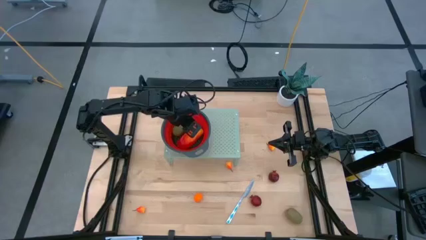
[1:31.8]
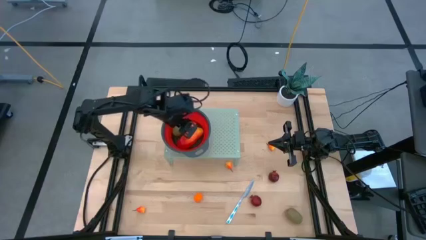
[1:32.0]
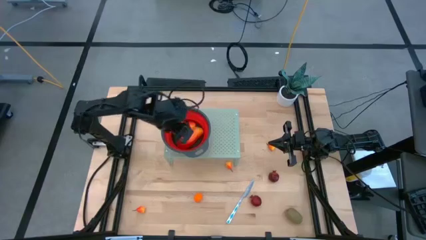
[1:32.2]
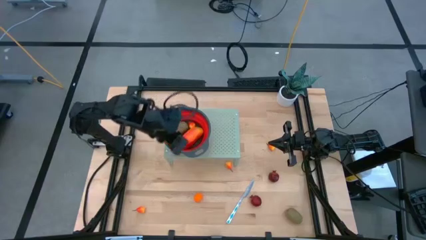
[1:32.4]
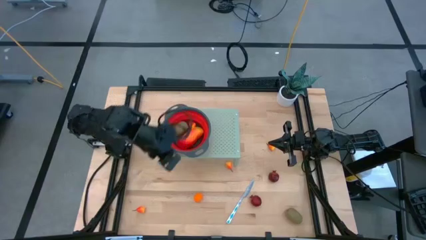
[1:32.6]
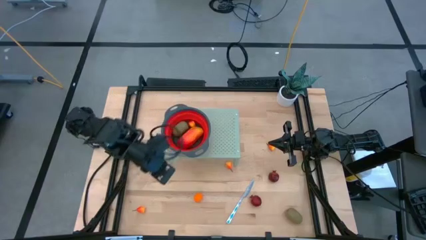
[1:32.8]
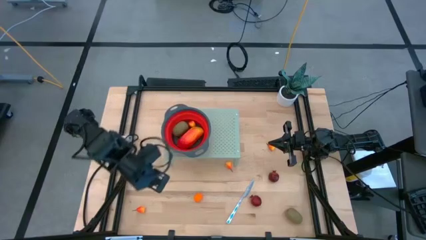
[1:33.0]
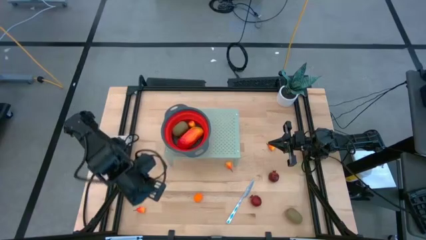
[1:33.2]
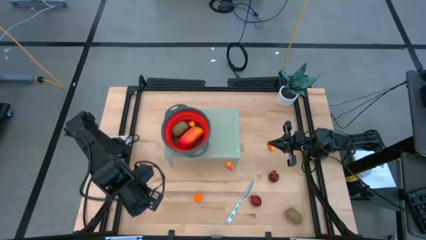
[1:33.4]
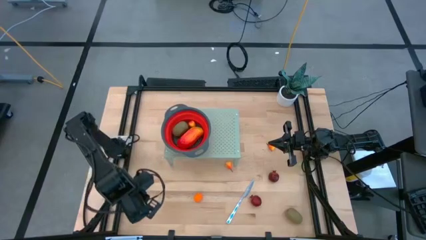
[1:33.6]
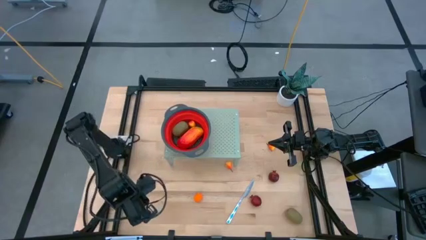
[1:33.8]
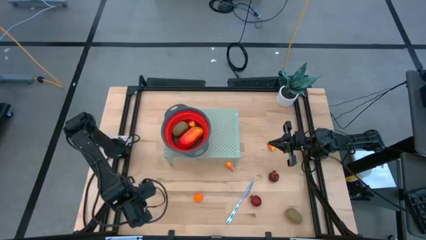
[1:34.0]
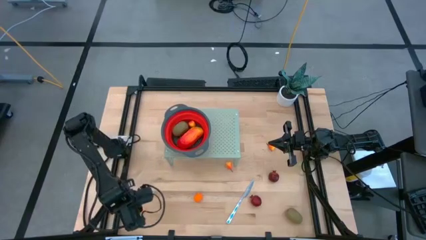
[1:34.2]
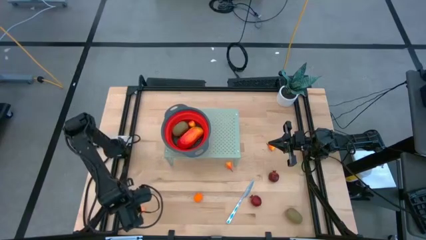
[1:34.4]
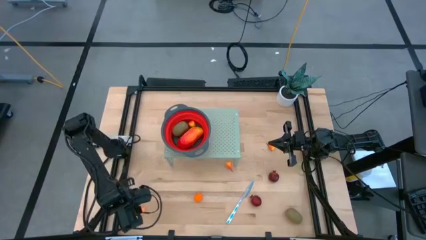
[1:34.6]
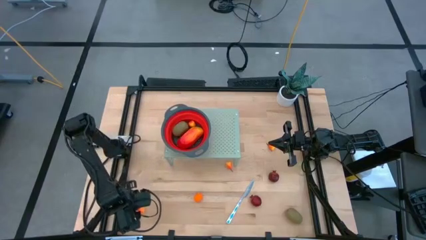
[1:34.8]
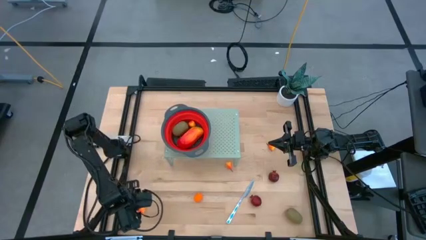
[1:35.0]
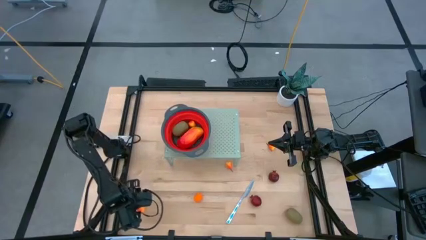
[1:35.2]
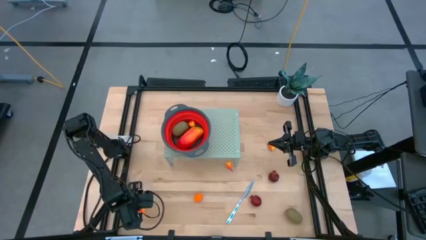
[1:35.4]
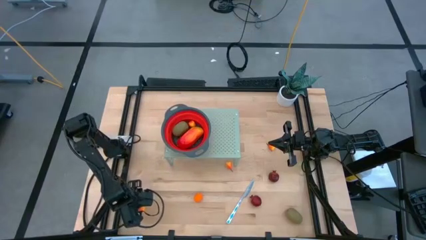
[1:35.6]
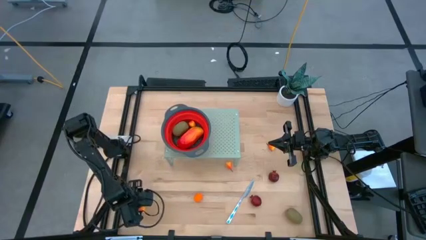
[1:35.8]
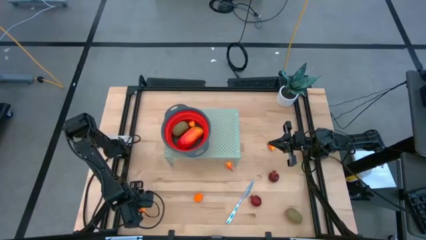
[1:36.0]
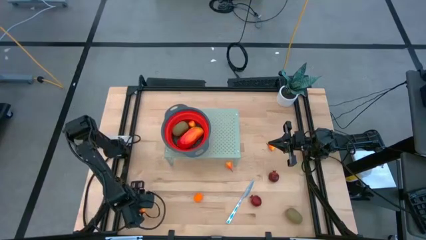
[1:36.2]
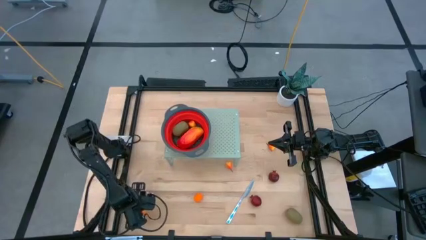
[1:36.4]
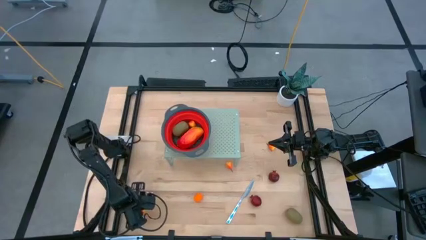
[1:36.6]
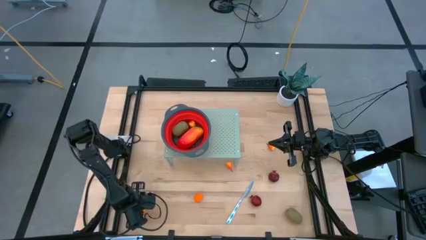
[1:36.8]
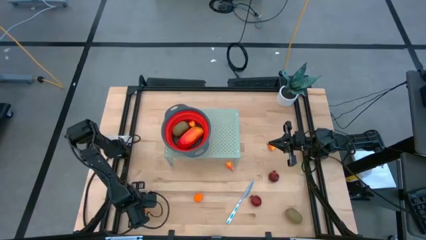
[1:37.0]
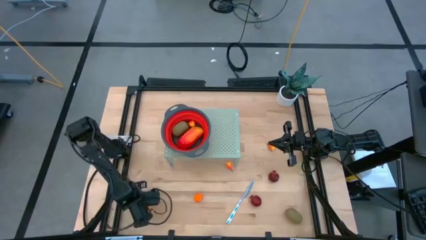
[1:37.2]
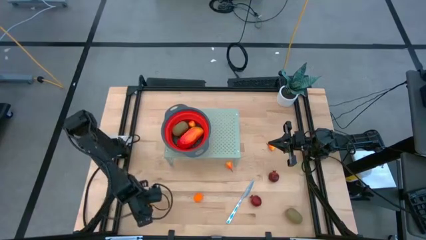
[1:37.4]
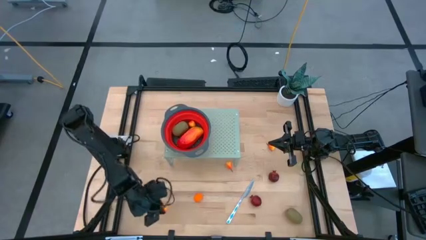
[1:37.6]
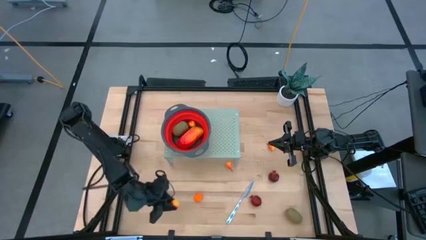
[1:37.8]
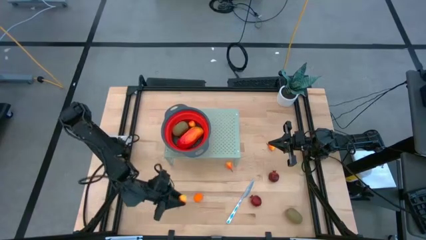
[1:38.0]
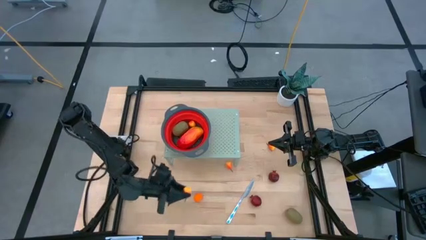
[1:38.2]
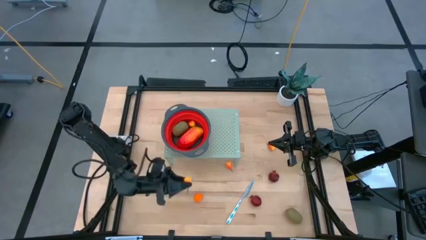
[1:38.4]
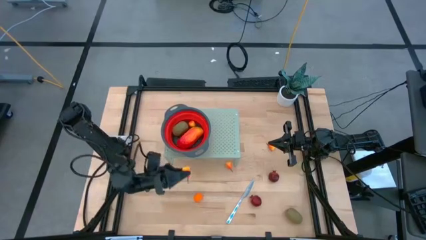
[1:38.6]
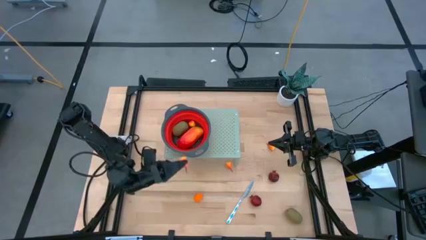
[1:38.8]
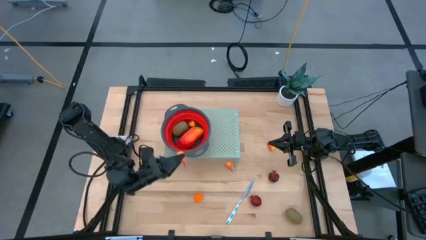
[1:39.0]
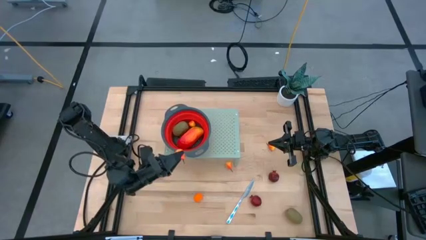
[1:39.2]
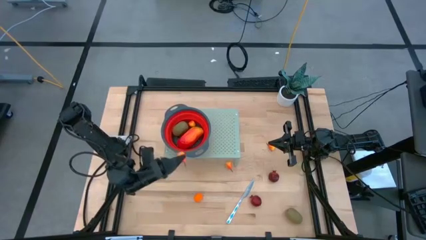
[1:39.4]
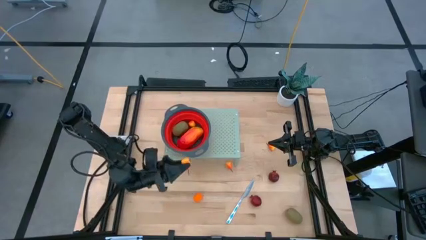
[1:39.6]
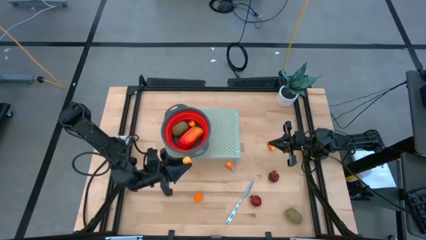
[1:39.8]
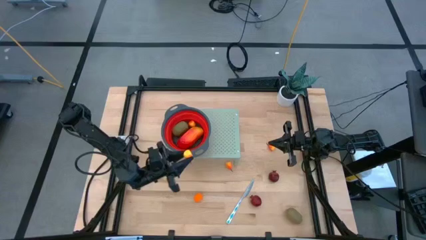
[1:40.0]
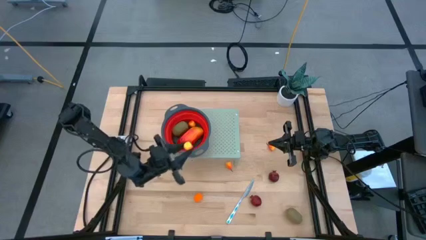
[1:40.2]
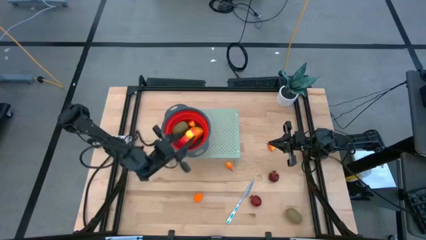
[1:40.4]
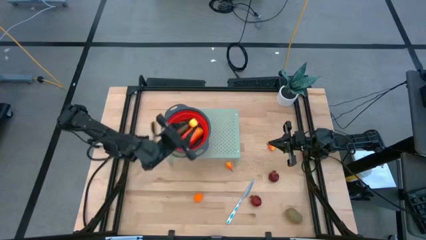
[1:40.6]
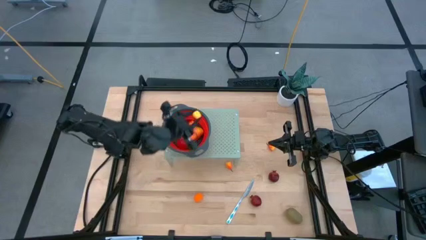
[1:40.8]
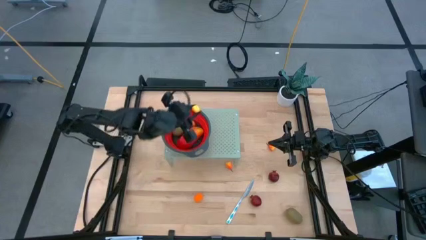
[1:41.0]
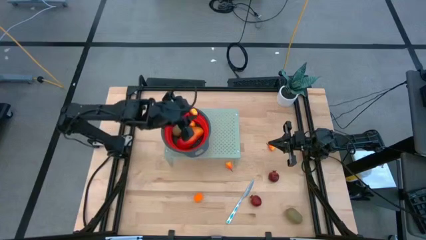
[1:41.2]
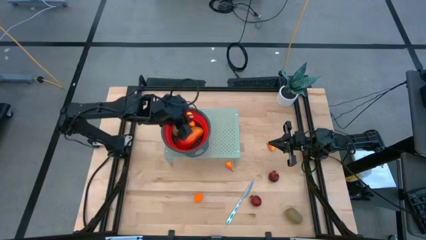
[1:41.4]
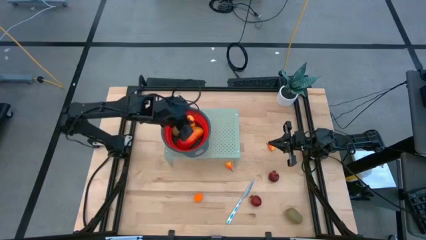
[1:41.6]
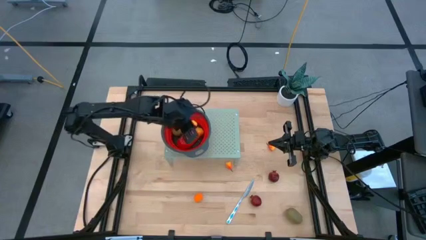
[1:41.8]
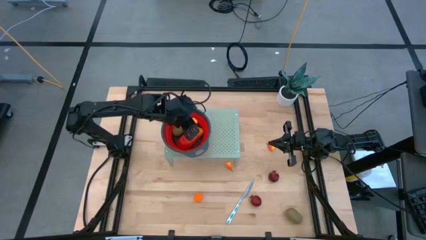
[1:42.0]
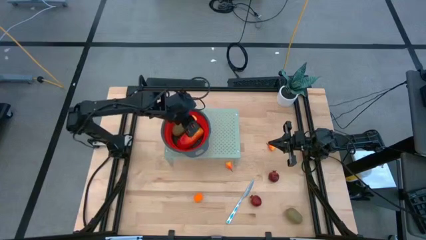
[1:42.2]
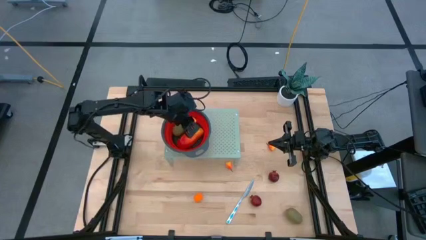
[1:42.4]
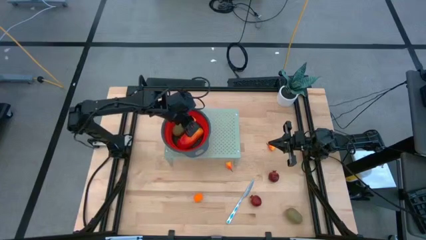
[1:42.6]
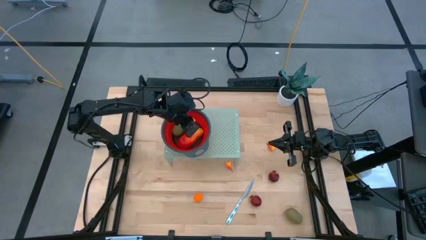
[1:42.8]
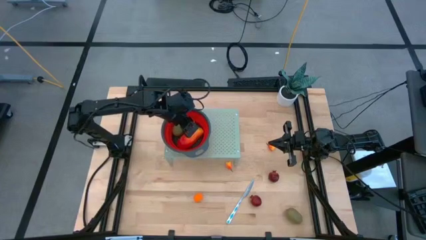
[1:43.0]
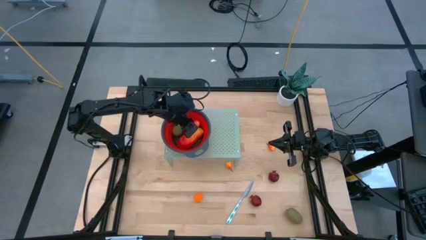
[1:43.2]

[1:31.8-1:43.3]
Task: Pick & Place Fruit
Put the orange pear into the red strainer bowl on the shelf

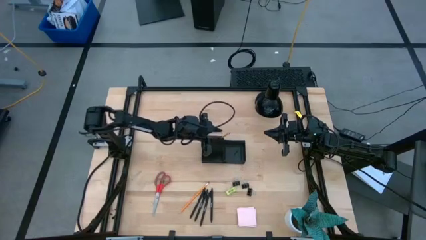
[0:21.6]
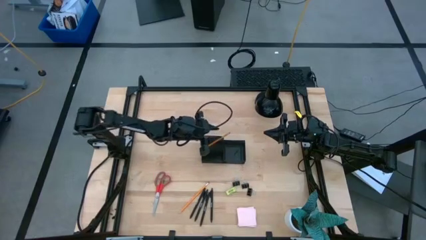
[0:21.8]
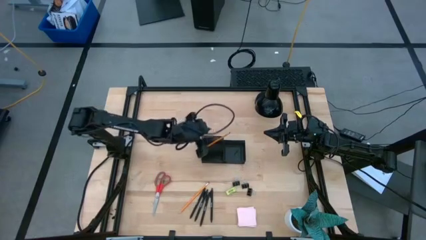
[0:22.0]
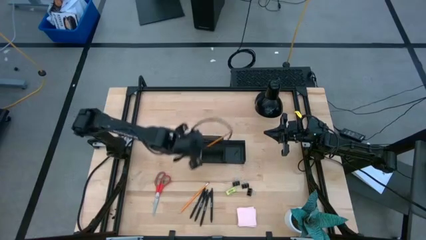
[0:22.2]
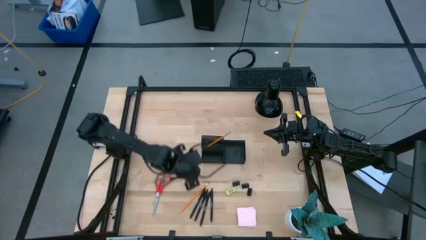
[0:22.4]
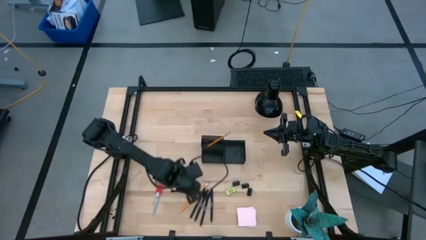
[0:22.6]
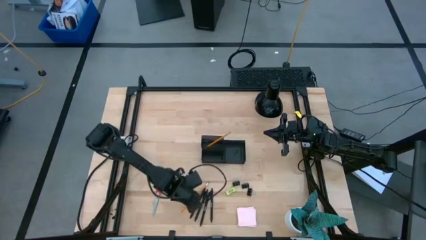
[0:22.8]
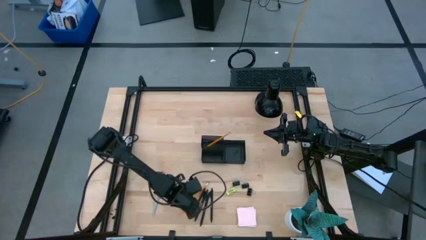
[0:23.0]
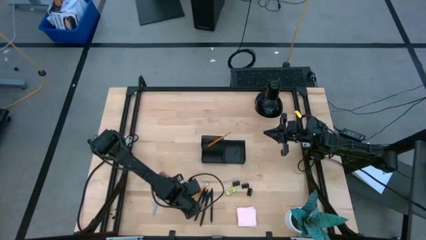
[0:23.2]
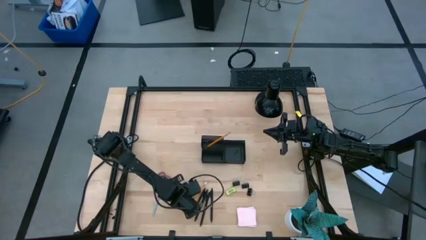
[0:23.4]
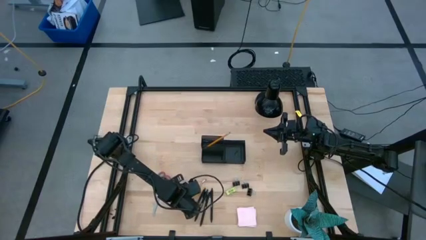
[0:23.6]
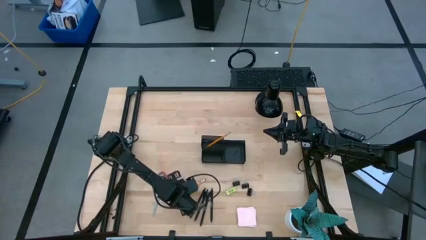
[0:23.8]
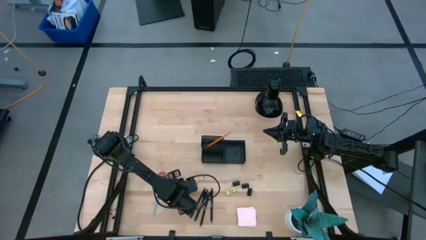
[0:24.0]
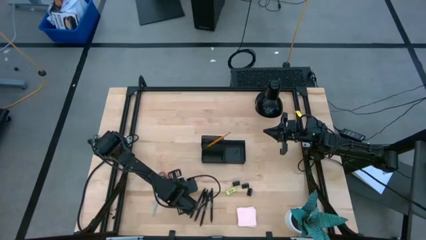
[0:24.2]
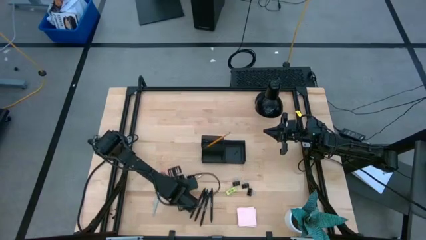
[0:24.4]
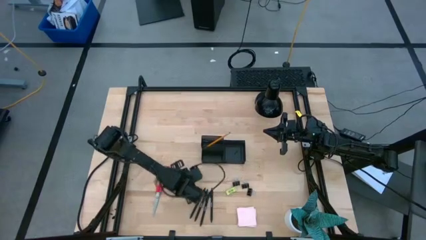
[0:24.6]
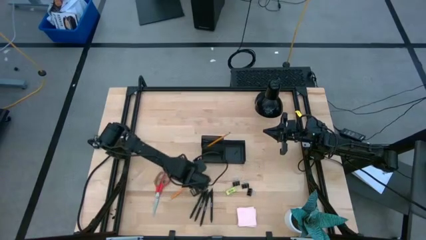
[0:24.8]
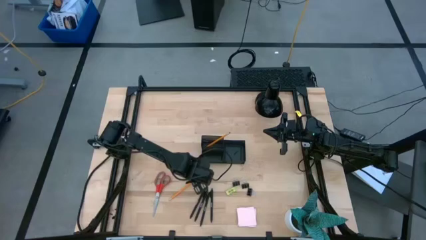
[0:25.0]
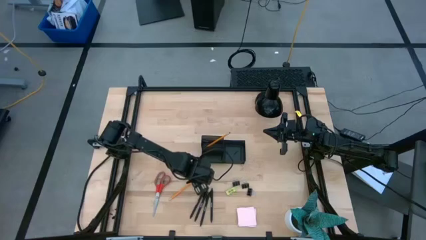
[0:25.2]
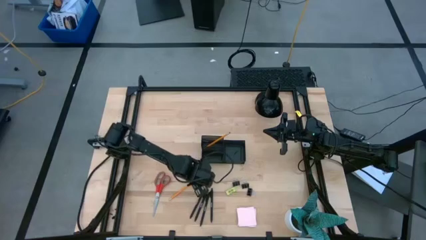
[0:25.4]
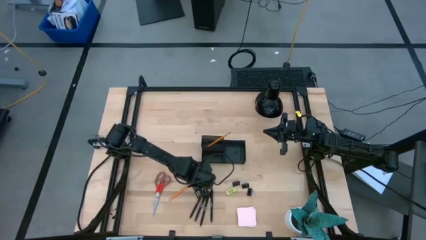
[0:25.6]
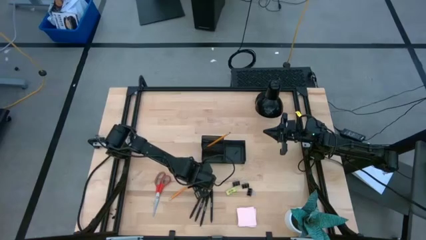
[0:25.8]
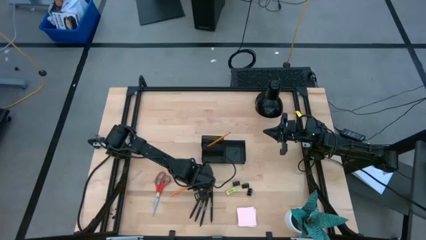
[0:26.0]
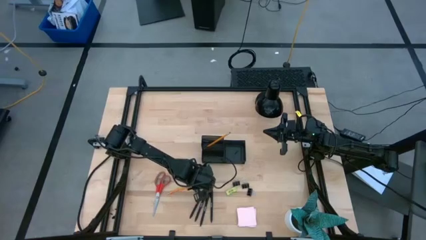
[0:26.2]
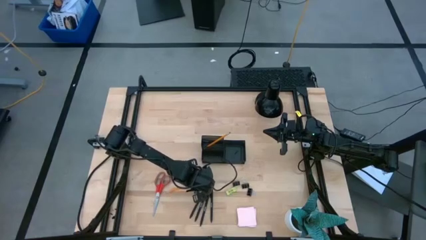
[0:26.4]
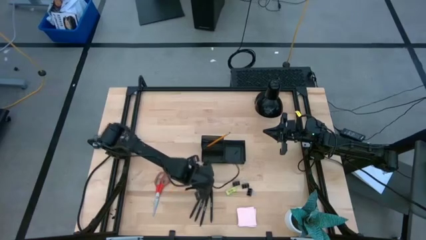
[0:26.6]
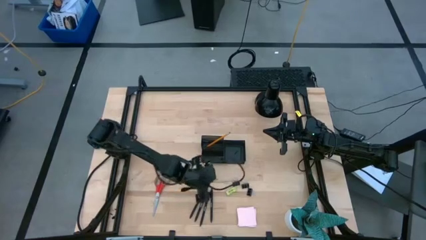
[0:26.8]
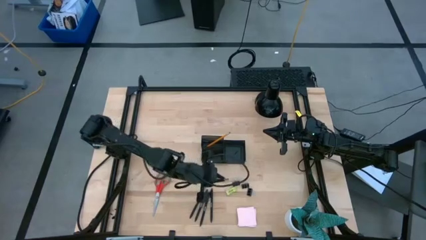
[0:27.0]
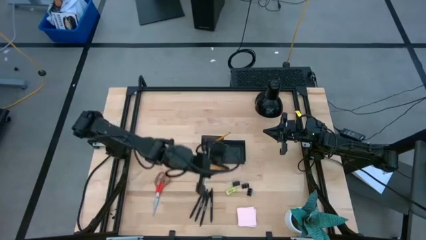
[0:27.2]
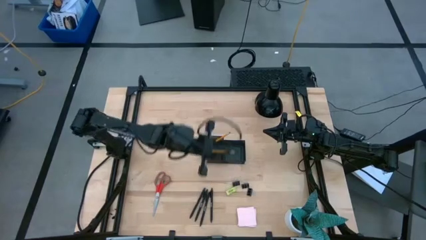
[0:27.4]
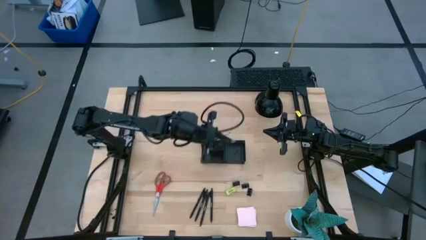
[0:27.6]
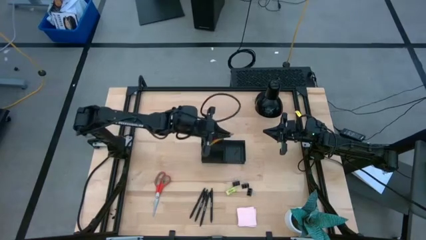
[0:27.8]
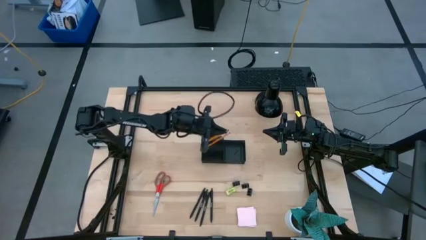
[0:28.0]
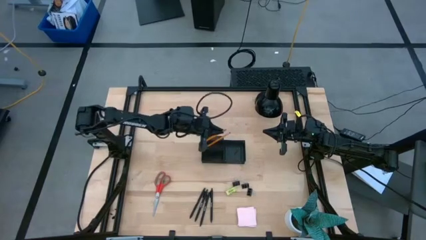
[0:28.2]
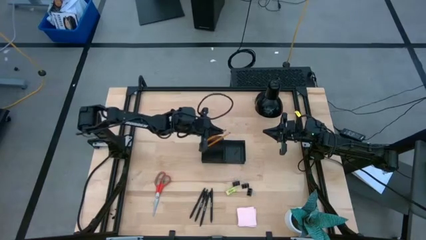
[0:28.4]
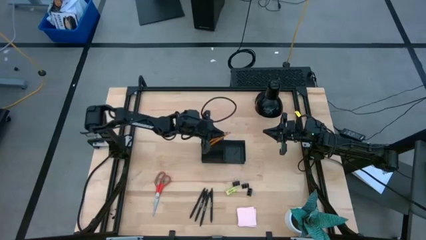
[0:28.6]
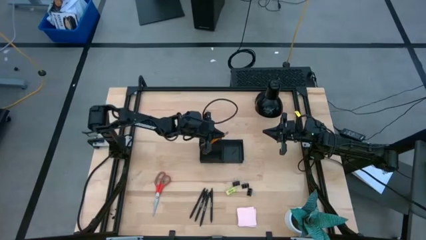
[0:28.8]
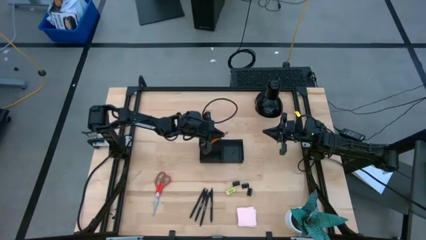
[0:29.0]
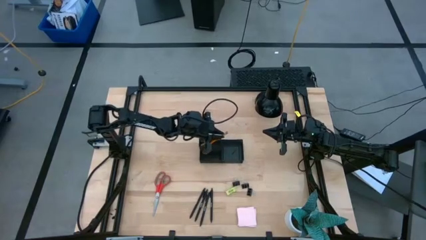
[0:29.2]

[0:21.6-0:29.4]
Task: Pick and place office supplies into organizer
Put the yellow pencil into the black desk organizer
